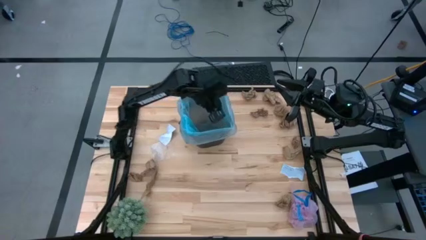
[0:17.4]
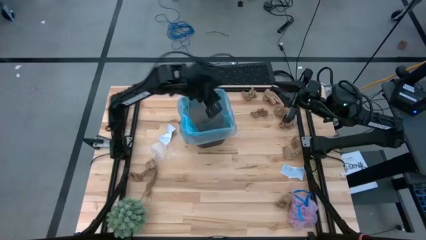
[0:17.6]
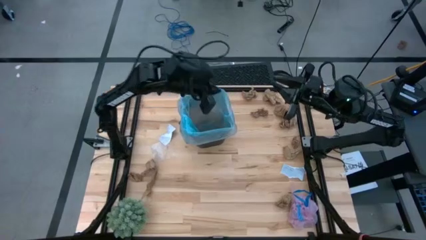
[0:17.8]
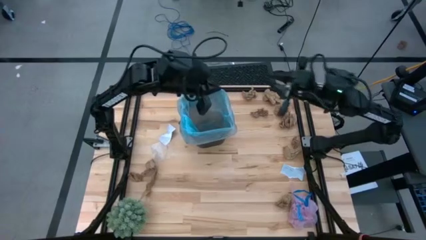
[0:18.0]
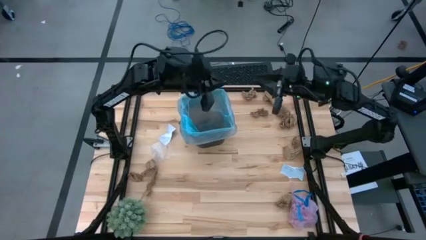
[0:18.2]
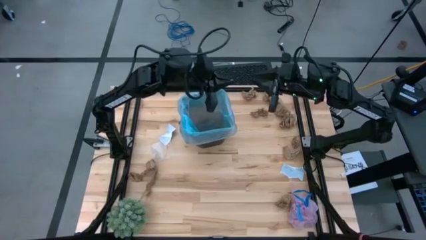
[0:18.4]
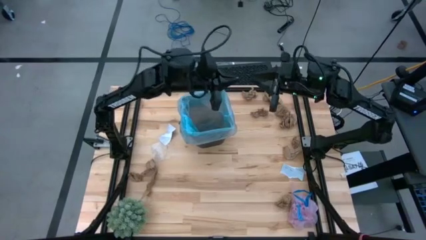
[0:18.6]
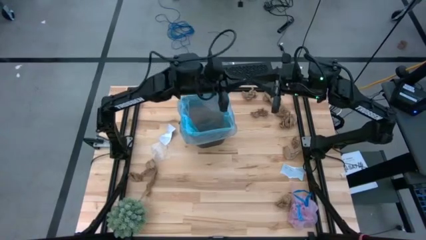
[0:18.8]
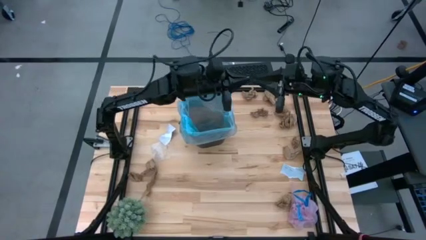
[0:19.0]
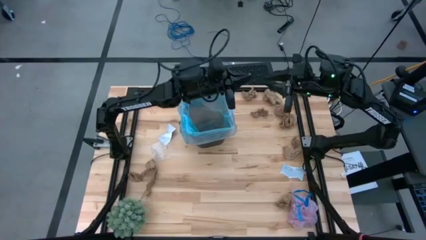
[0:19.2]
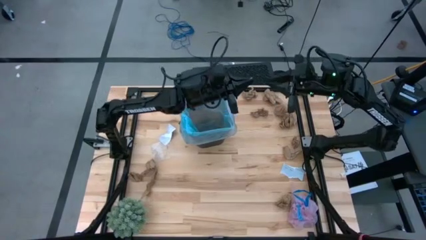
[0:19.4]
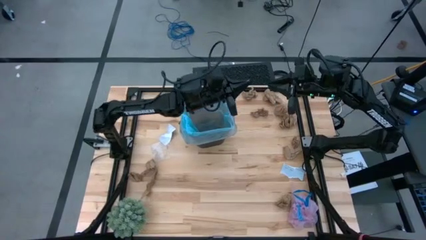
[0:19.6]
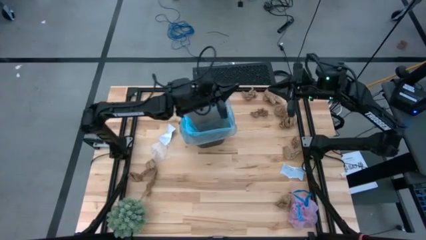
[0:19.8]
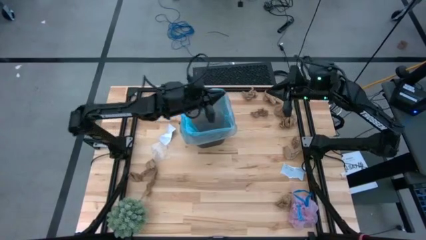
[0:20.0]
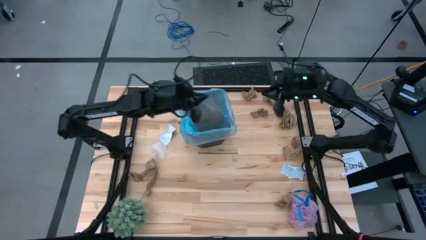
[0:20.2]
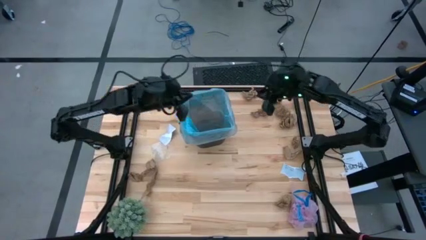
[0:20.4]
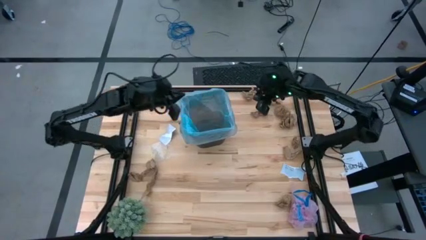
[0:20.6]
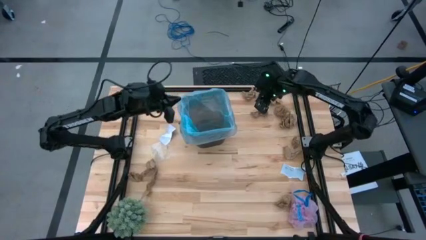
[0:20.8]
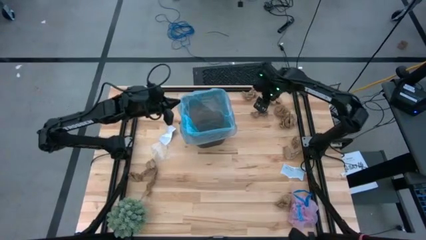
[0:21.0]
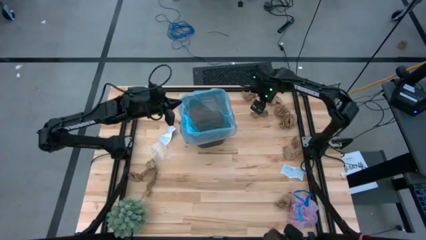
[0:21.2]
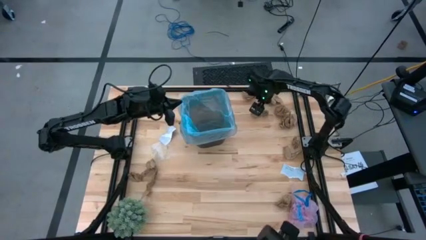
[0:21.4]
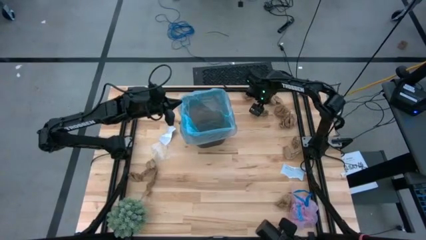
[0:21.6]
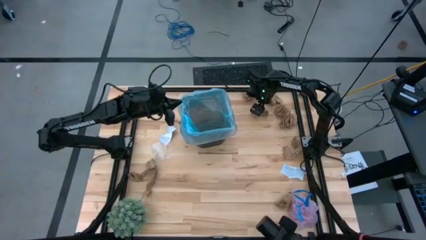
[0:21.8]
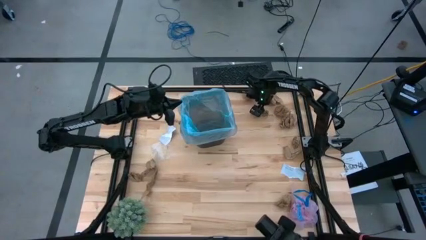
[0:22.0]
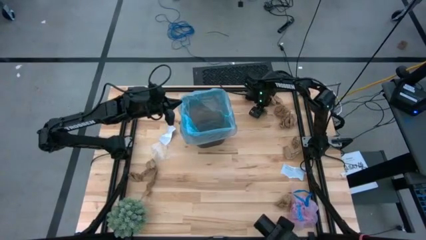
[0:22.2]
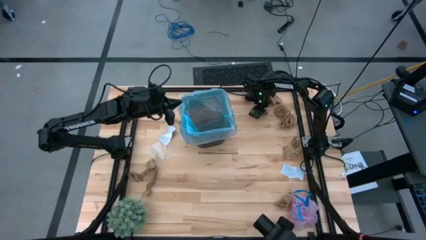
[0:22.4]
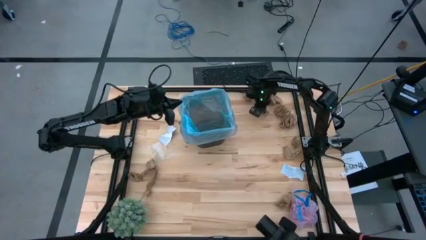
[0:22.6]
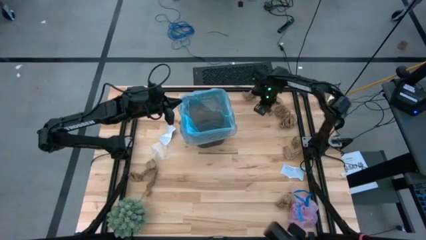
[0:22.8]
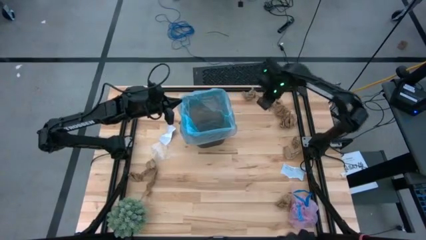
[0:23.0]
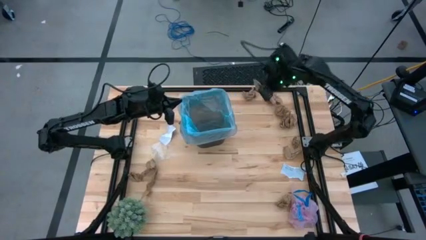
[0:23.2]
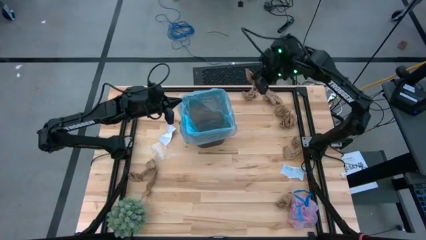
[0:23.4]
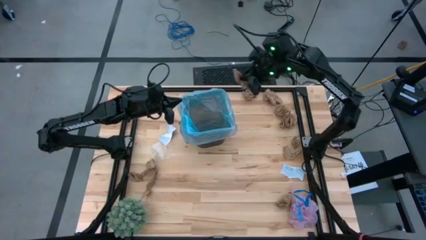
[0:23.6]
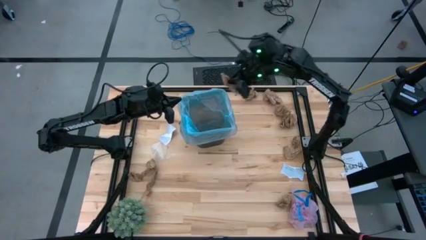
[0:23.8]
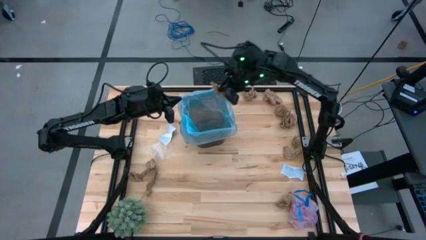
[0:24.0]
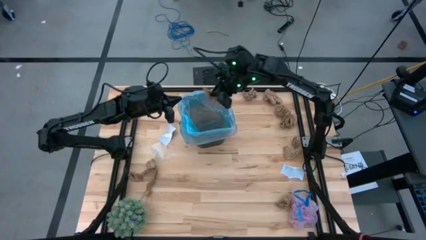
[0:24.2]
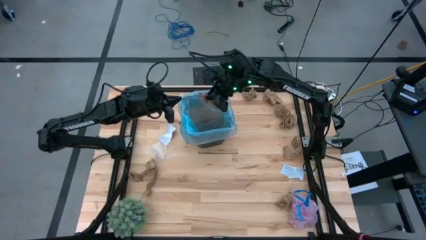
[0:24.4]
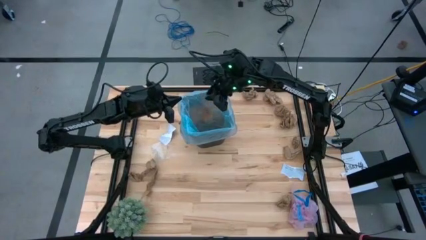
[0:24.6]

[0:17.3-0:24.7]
Task: Pick and place trash into bin
Put the brown paper into the brown trash bin

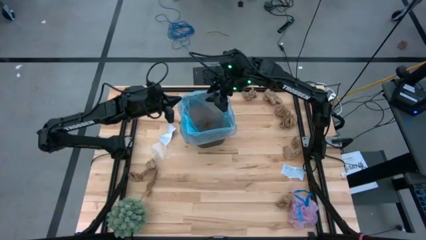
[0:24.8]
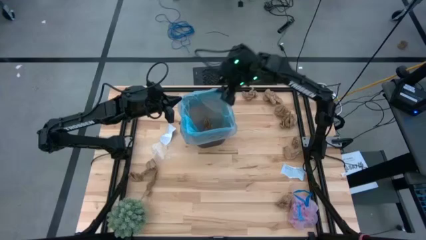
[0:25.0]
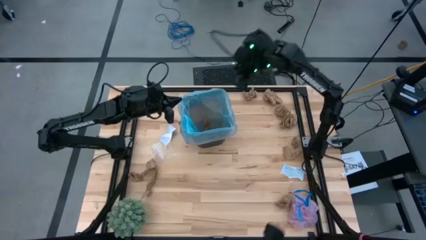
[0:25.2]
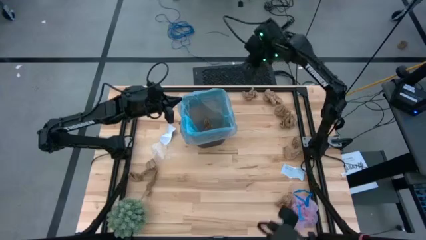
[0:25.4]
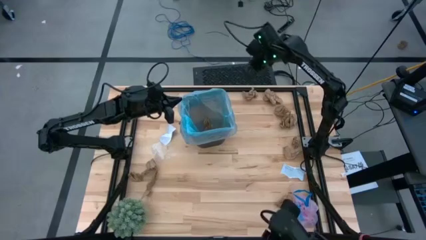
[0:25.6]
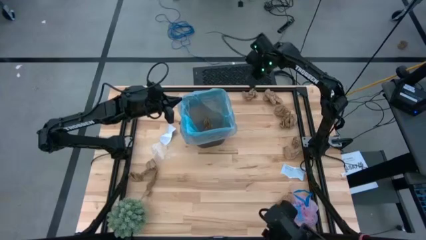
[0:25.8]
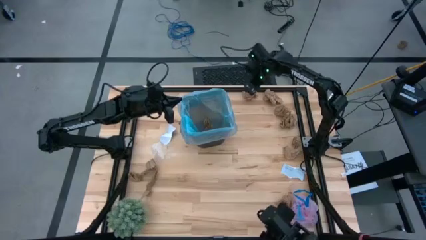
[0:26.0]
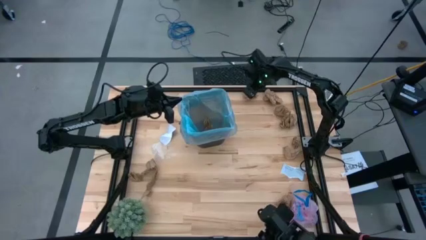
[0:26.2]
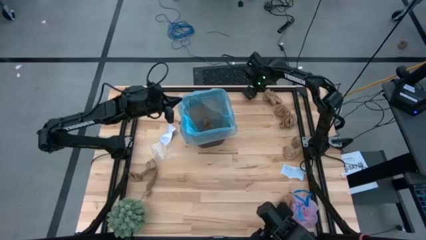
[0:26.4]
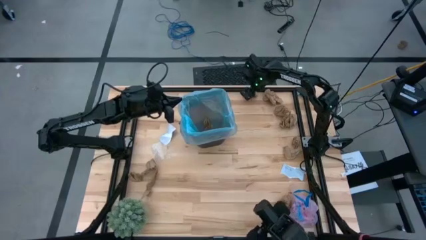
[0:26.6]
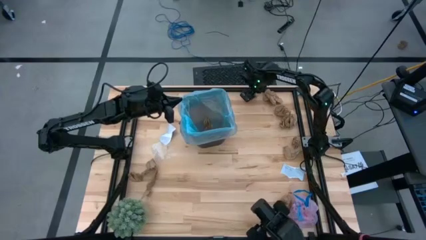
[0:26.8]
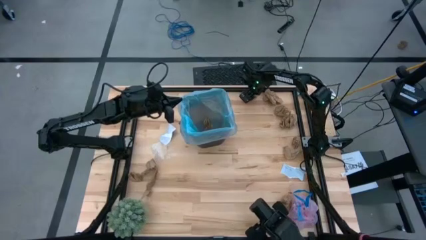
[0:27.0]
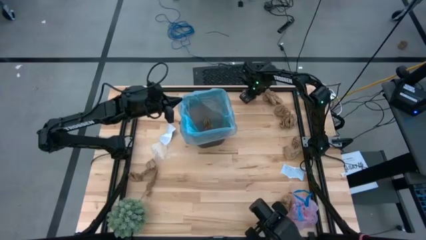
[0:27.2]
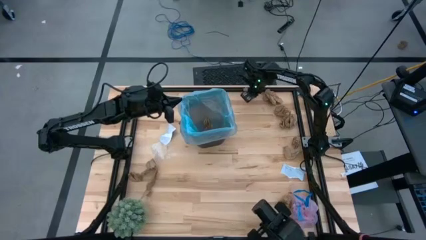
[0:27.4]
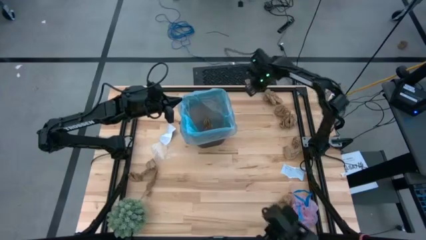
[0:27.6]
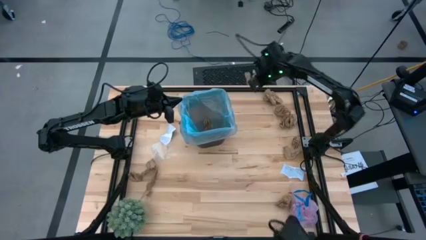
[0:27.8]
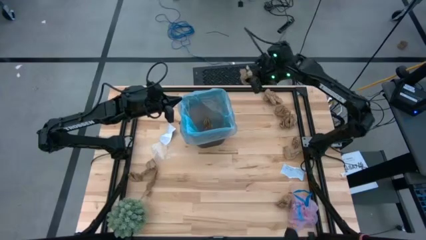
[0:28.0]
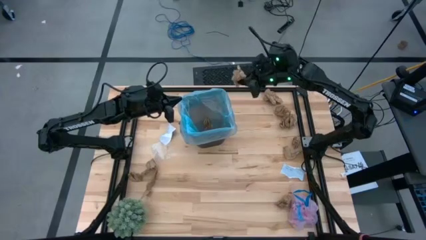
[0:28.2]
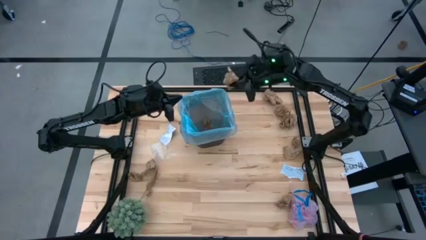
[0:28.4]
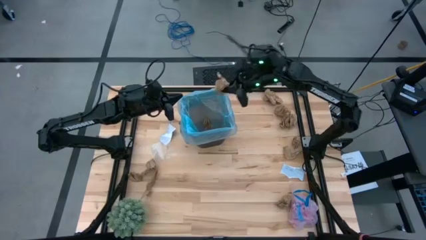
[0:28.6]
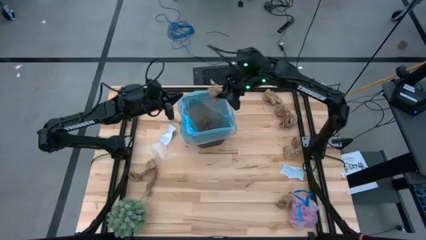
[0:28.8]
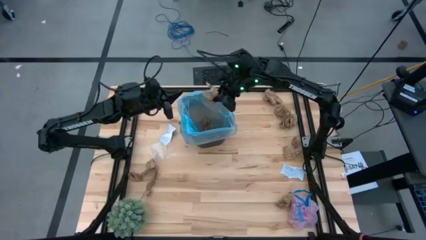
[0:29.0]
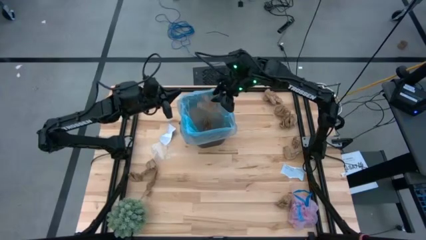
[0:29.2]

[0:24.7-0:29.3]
Put the brown paper into the brown trash bin

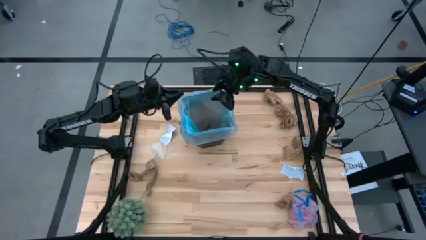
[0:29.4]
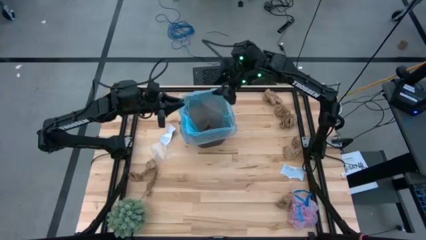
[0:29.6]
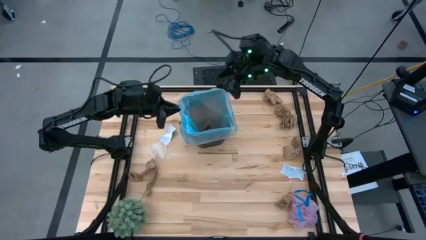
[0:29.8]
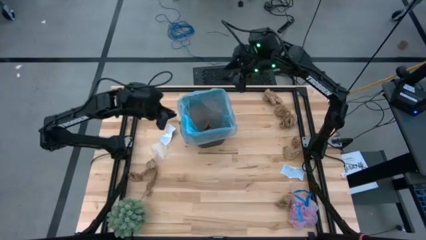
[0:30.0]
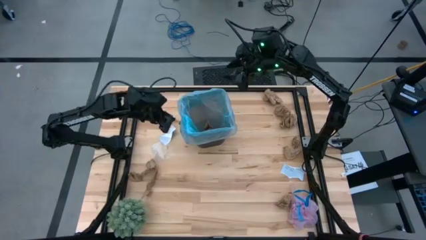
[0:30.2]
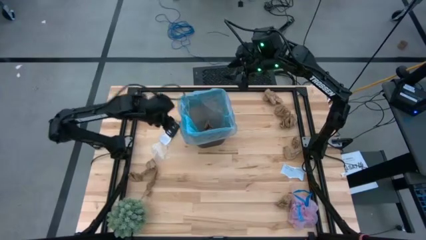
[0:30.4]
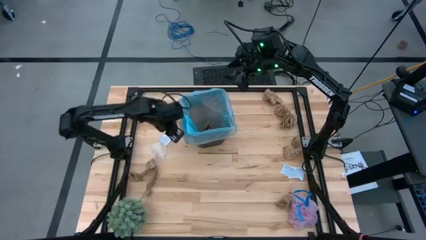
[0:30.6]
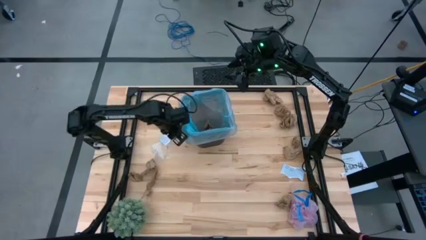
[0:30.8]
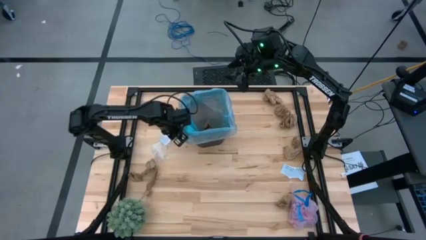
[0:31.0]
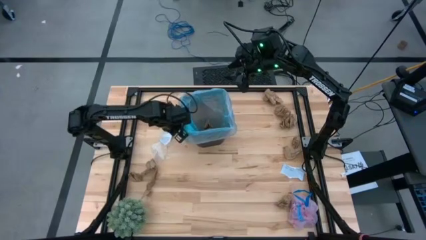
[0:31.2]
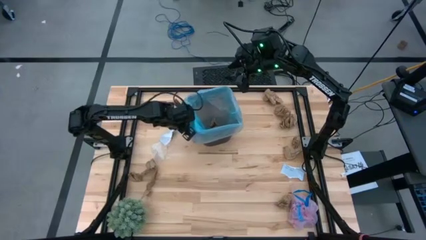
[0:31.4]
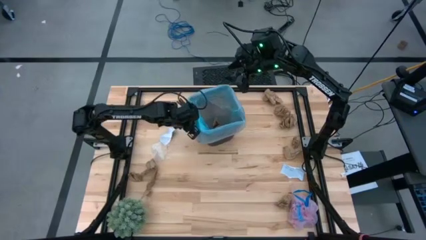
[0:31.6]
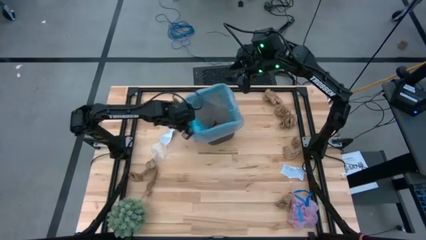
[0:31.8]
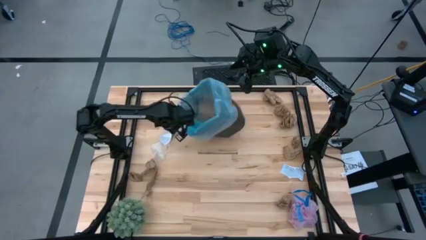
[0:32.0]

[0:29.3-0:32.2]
Adjust the brown trash bin
